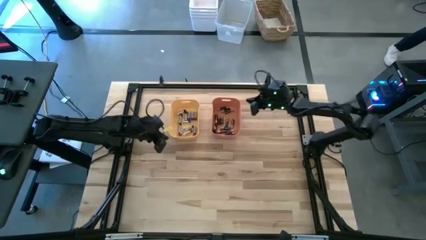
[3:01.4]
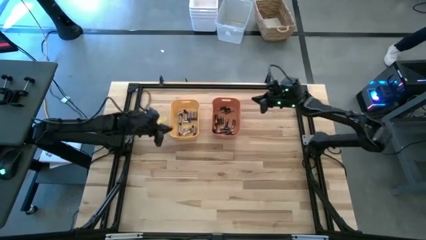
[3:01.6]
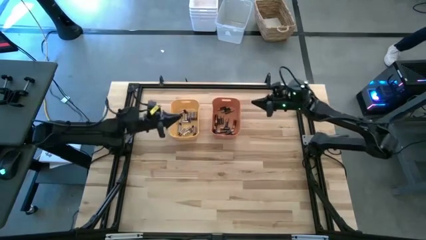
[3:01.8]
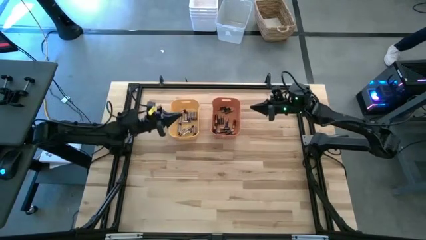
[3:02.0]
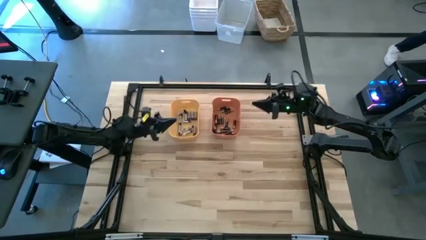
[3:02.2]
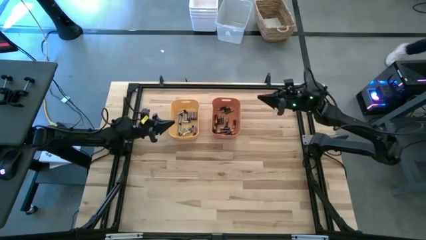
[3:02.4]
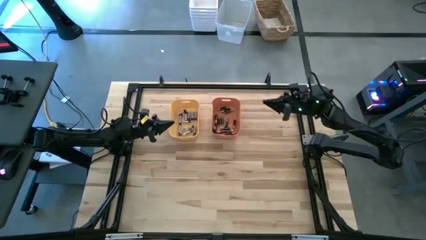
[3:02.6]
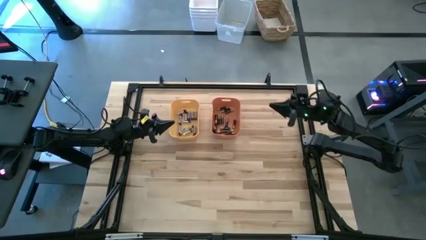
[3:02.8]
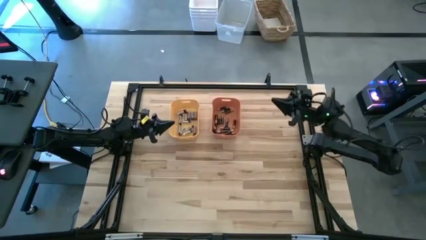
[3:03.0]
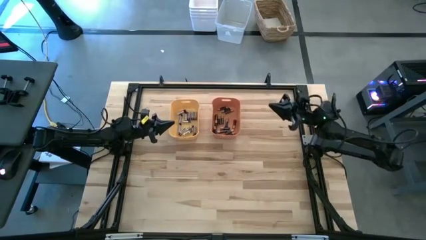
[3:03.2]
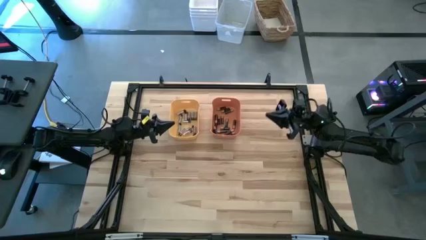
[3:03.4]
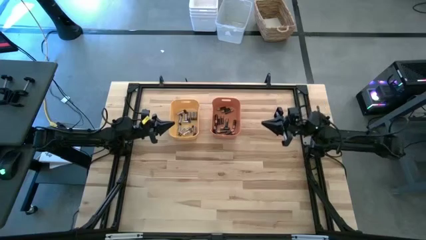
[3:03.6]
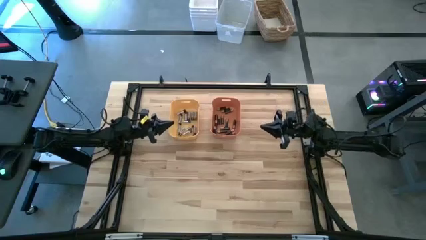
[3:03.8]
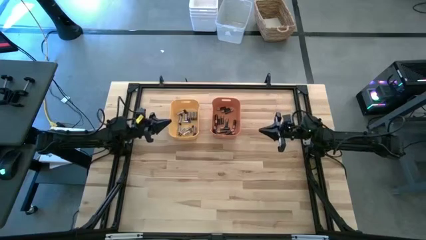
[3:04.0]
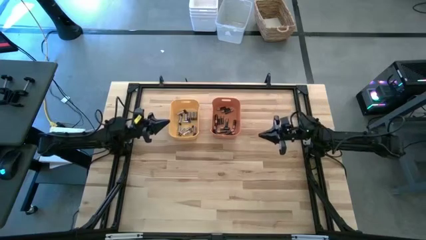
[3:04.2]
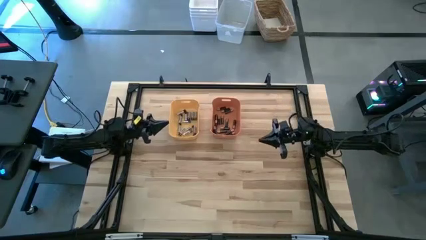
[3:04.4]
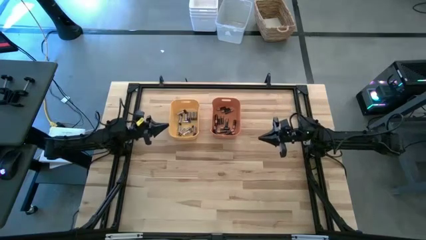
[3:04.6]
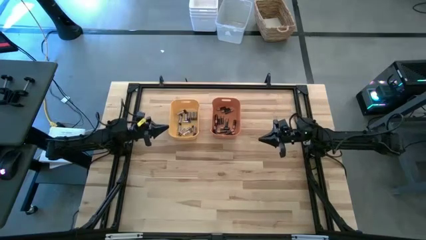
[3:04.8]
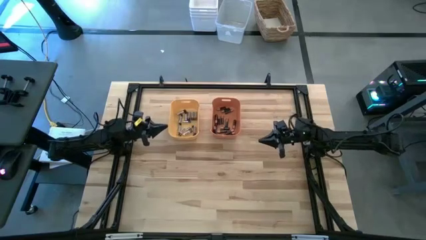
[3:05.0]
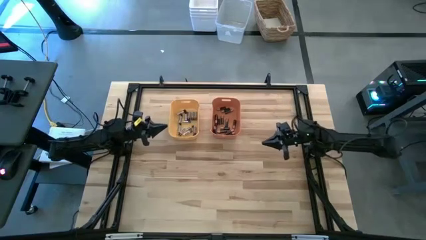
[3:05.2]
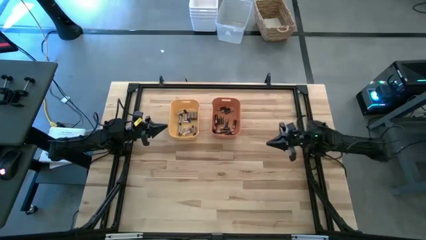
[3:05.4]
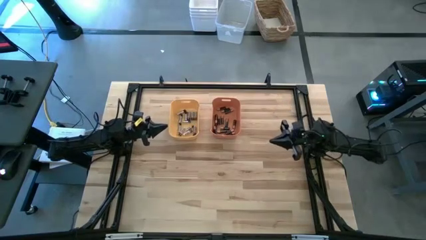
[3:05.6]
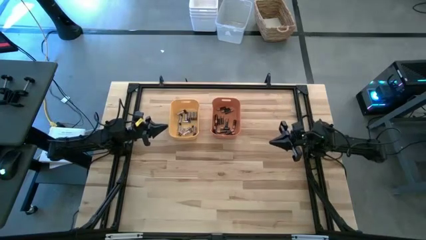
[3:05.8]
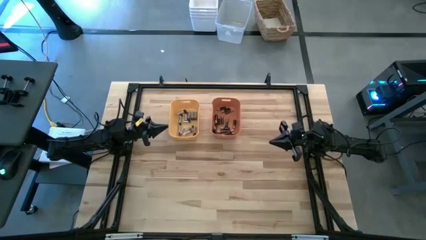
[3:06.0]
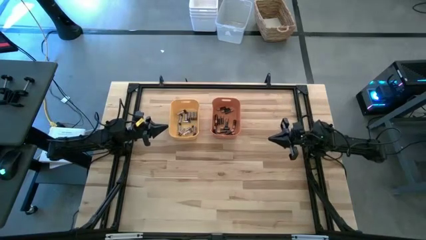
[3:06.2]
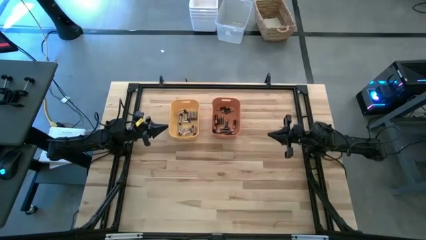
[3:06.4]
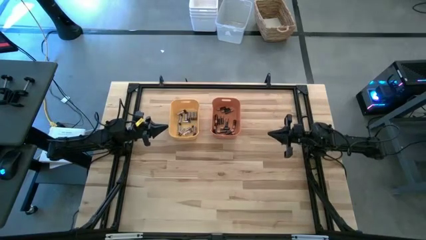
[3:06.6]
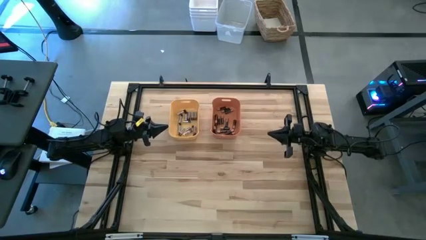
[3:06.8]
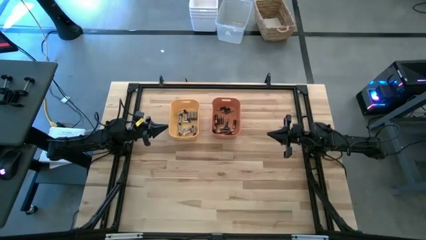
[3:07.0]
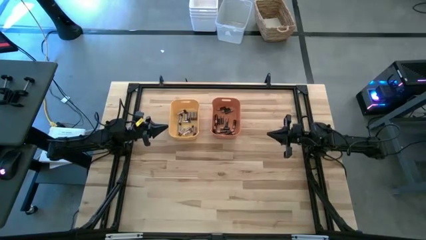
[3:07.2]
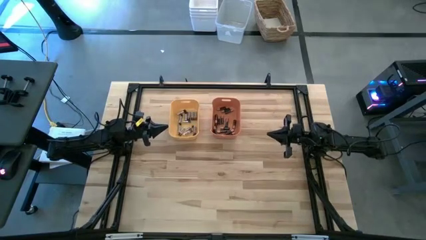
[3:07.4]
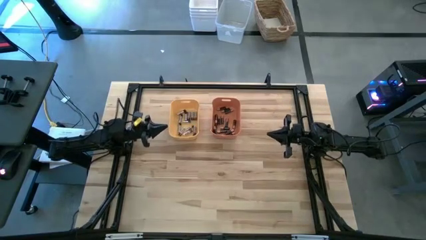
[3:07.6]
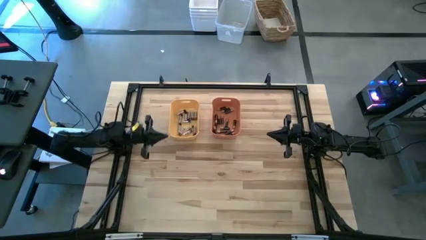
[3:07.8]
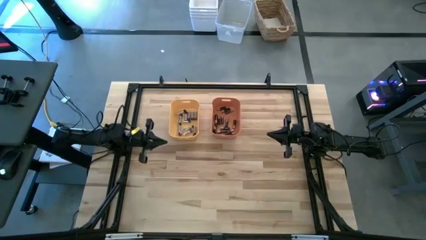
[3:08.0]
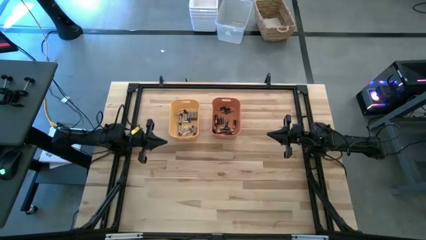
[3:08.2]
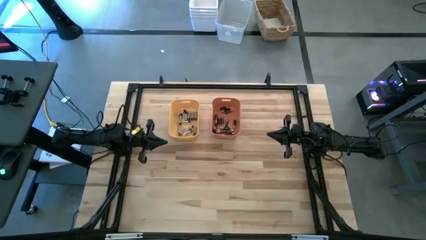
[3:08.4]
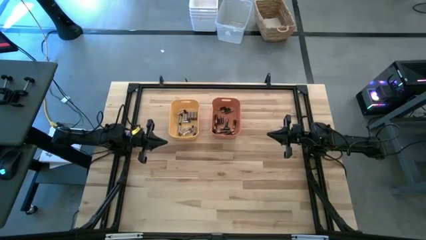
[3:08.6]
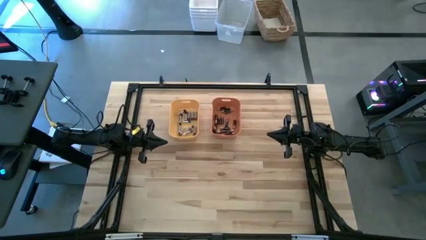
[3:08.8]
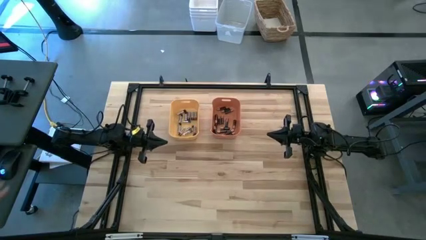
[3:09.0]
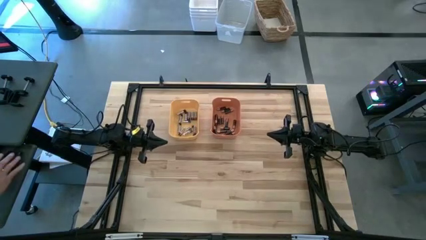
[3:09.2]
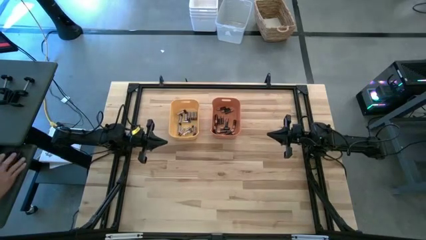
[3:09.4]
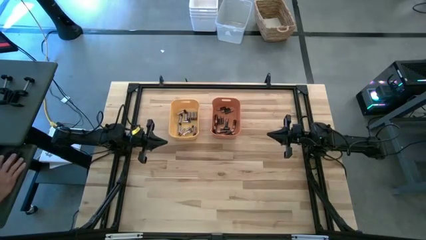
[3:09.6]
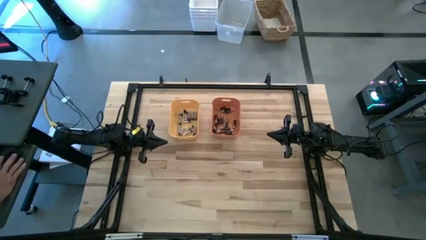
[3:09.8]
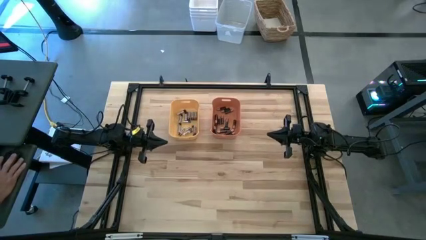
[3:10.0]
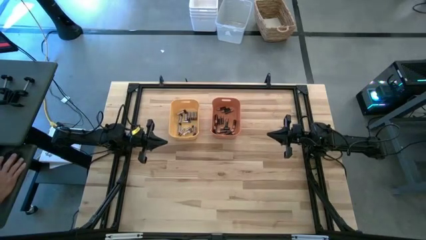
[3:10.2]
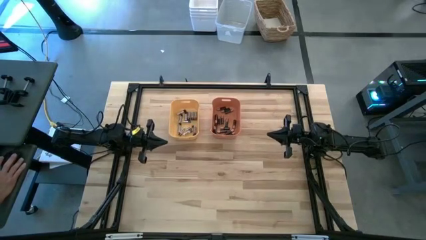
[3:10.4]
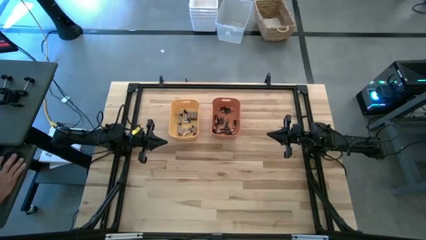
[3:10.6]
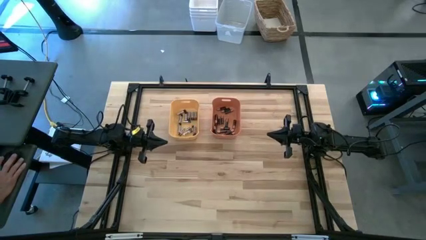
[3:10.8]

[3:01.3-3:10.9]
Task: Sort batteries
Return to Home Position

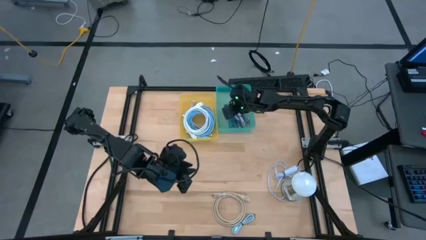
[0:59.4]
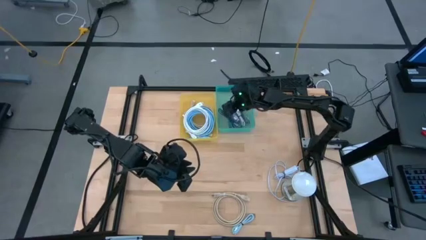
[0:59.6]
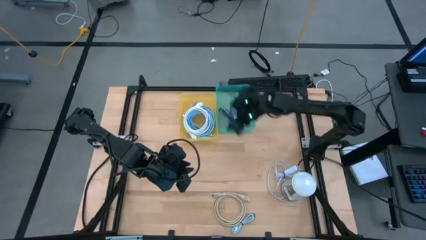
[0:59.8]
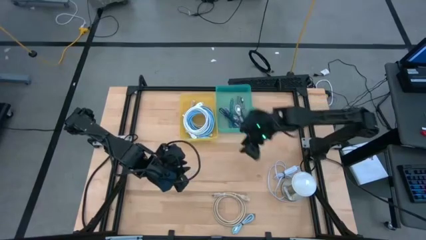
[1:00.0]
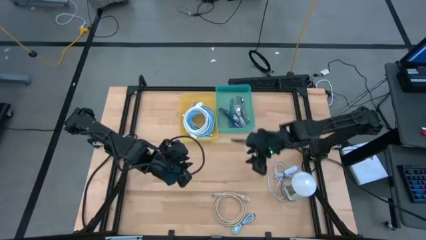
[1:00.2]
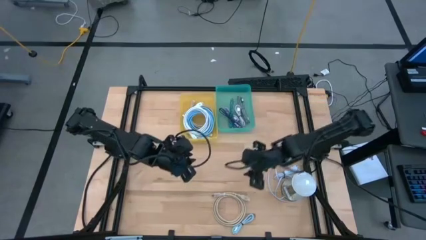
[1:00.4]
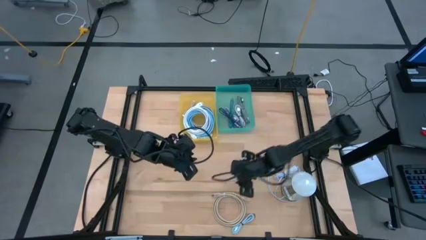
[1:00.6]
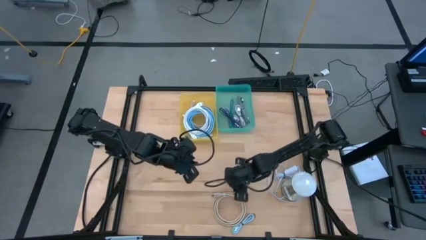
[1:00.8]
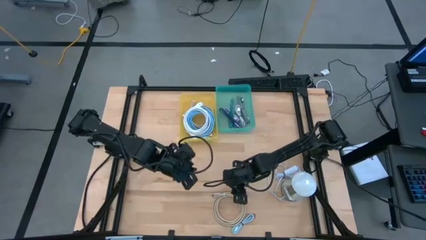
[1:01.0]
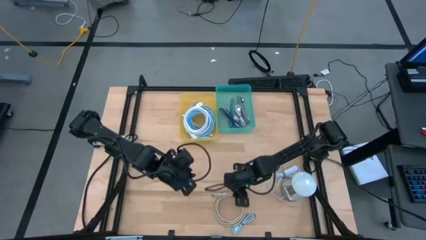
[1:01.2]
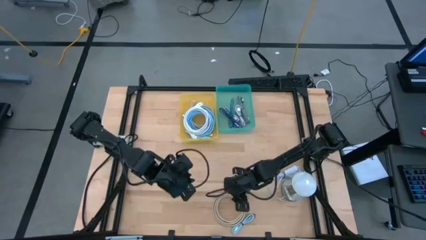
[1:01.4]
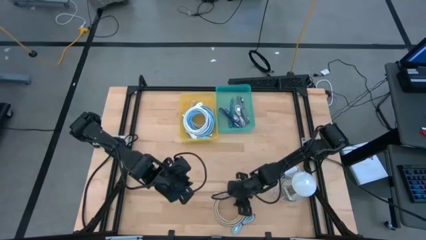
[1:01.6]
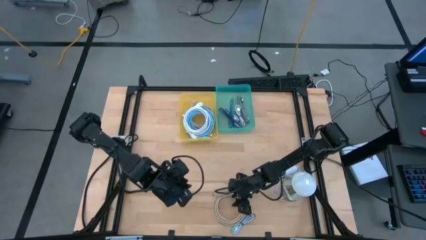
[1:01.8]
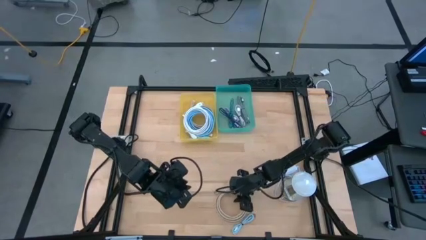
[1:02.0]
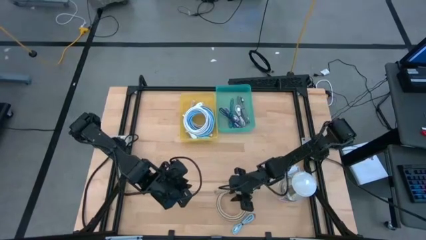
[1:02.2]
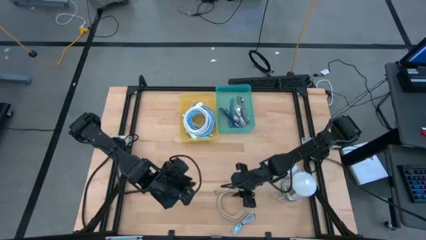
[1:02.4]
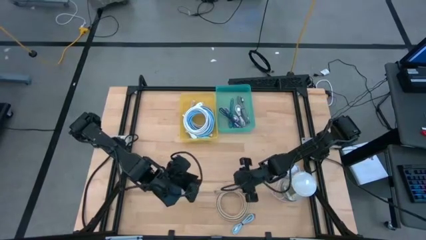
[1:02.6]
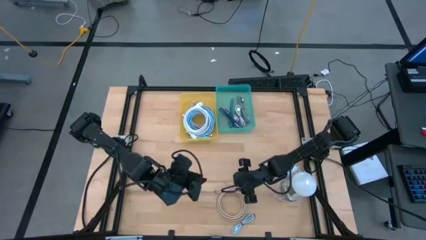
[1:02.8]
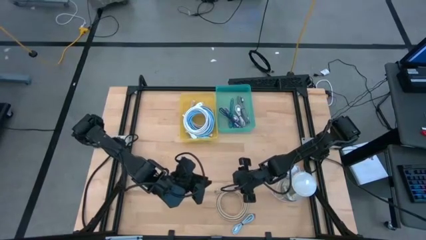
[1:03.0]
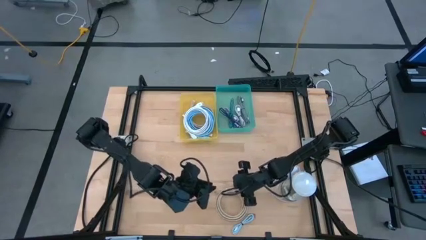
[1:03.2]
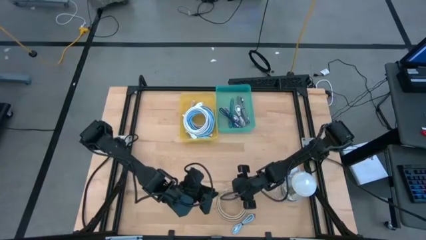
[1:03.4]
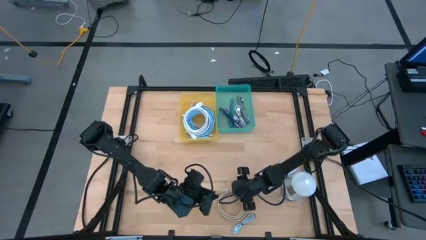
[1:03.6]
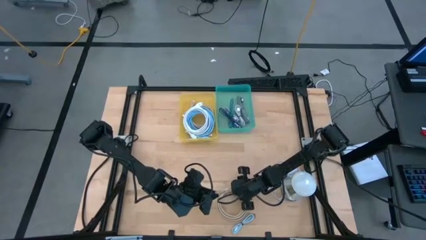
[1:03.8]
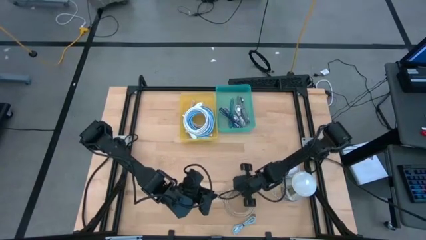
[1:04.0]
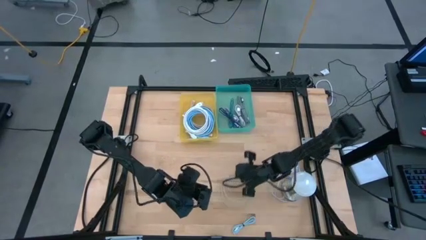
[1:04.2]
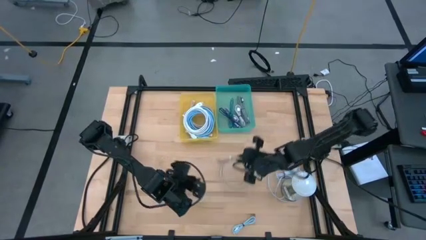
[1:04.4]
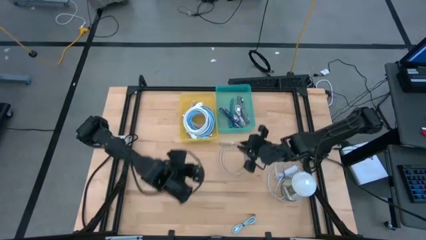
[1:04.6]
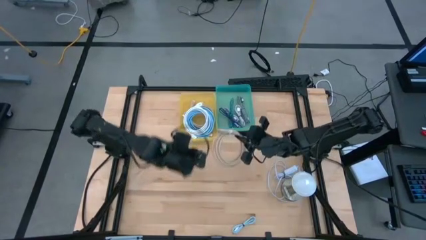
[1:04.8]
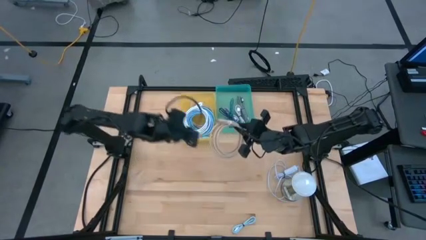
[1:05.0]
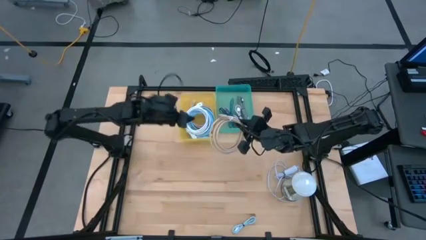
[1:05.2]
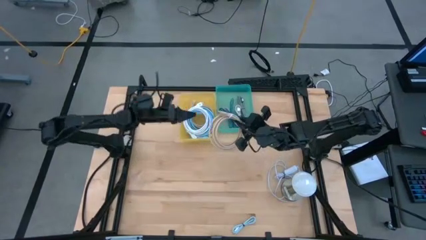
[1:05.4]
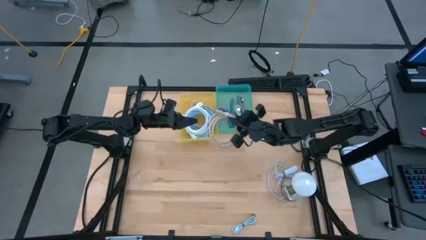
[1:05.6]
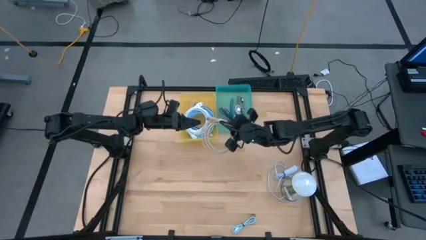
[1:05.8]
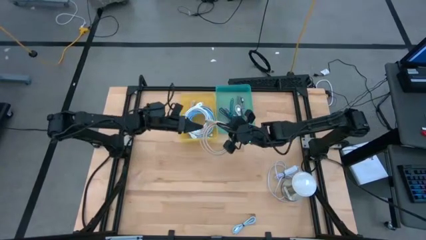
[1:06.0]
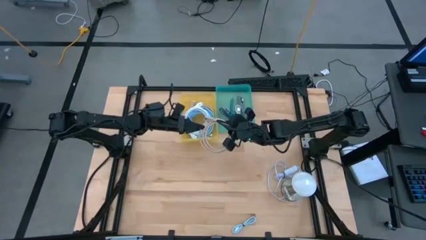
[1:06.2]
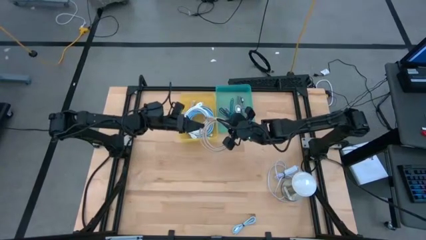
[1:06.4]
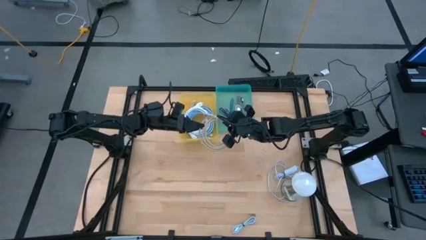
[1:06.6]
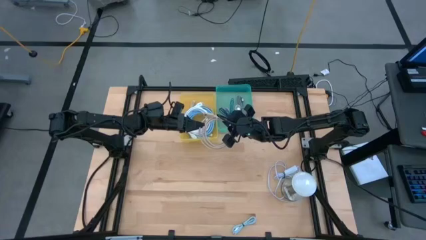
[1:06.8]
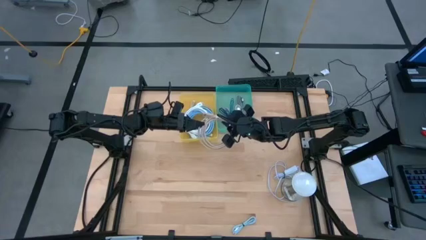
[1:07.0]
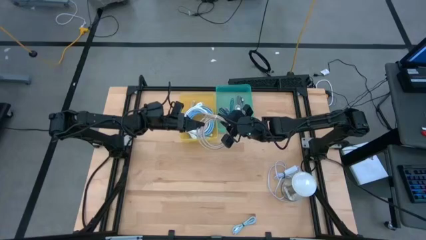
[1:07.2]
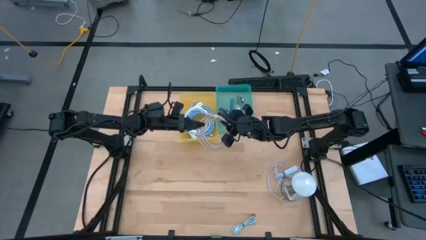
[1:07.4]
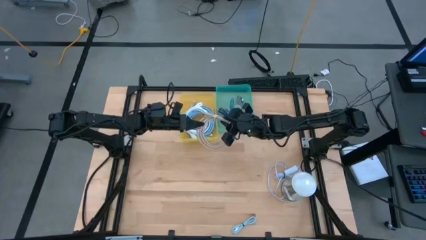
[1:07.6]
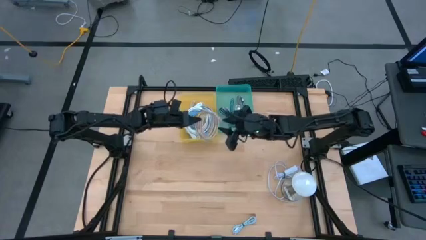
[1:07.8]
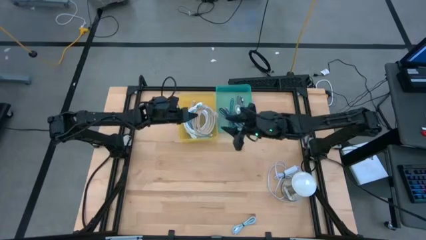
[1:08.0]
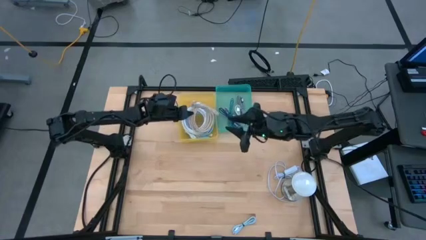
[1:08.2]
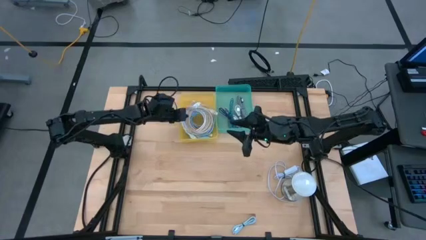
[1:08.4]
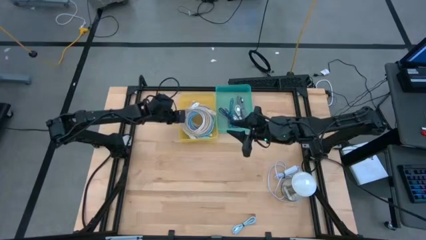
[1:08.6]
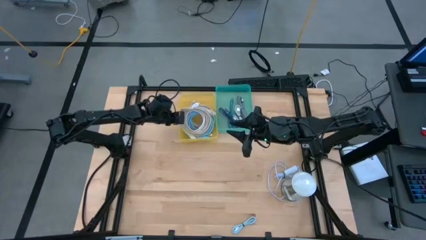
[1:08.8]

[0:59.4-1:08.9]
Task: Pick & Place USB Port
Put the light brown HDMI cable into the yellow bin
